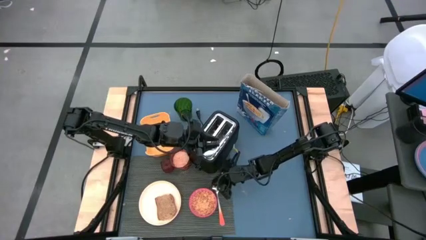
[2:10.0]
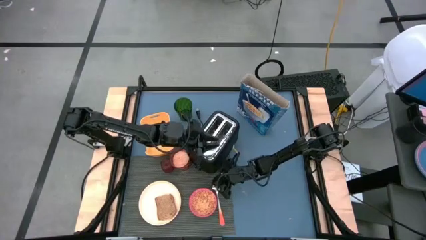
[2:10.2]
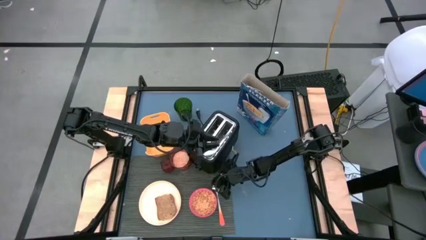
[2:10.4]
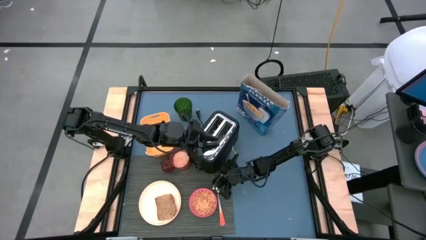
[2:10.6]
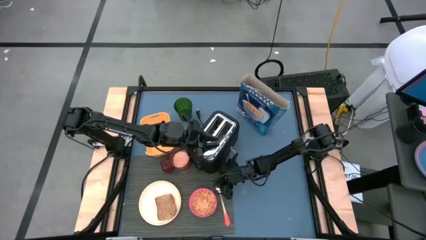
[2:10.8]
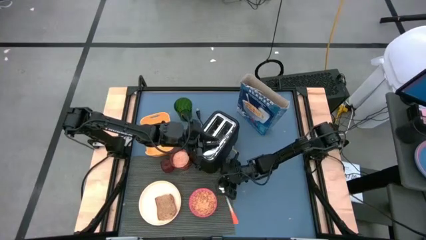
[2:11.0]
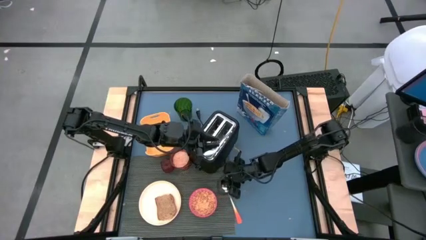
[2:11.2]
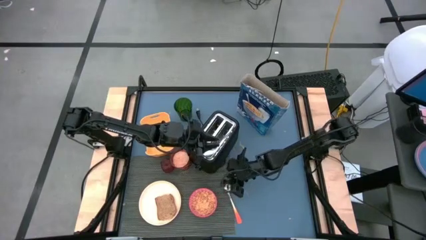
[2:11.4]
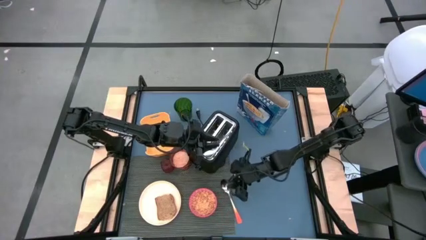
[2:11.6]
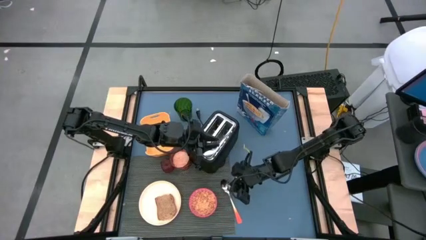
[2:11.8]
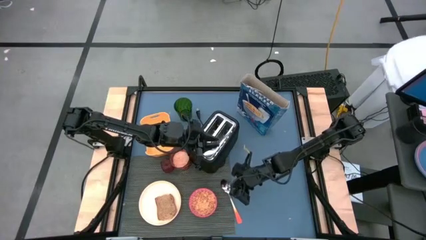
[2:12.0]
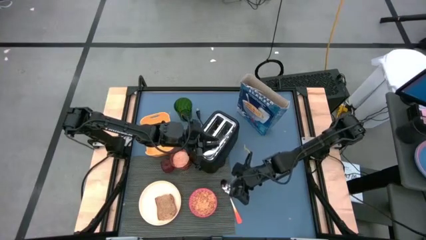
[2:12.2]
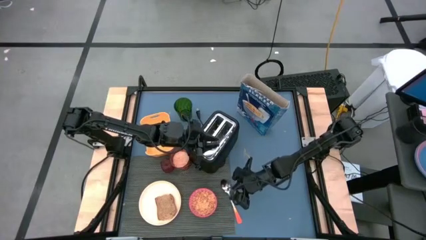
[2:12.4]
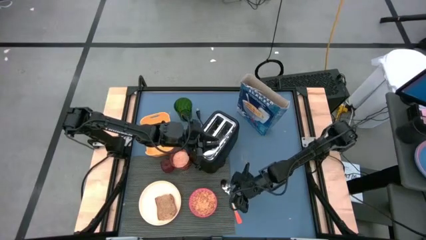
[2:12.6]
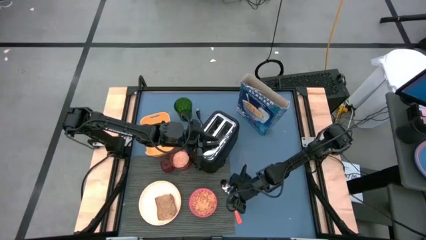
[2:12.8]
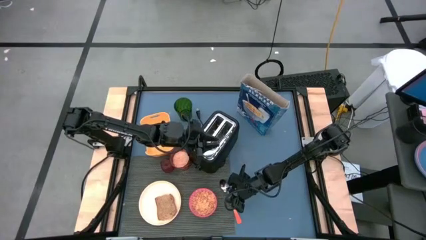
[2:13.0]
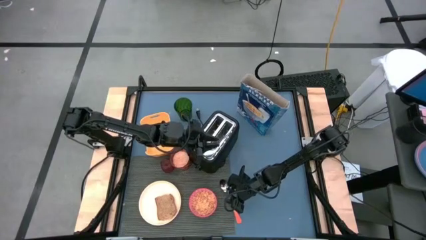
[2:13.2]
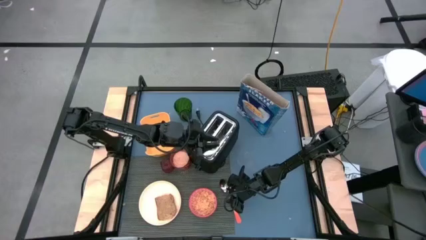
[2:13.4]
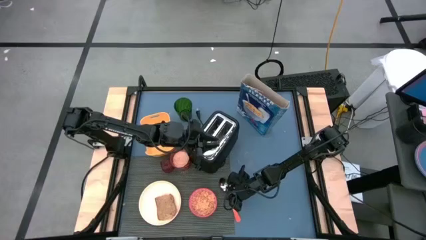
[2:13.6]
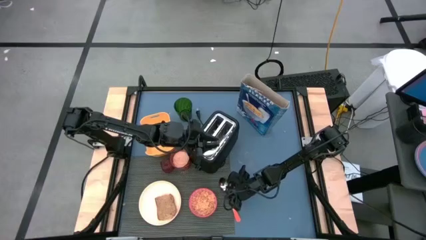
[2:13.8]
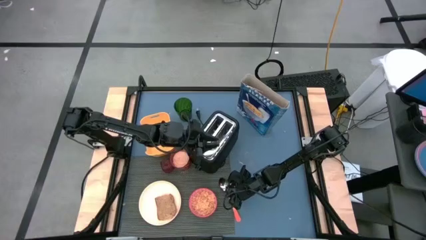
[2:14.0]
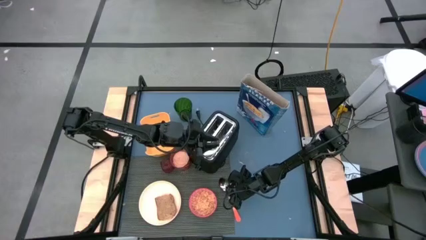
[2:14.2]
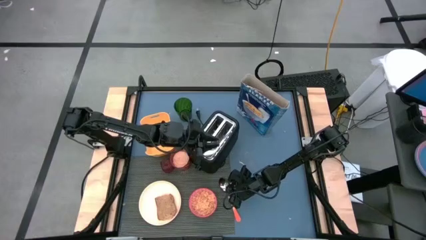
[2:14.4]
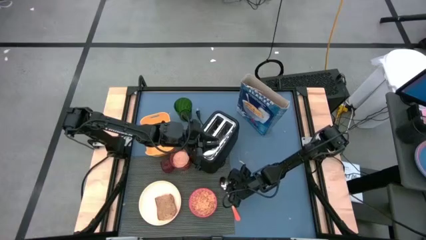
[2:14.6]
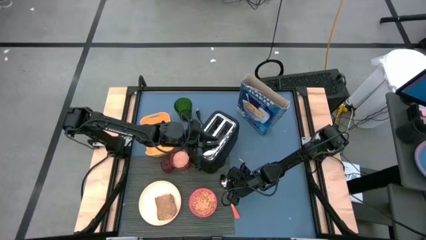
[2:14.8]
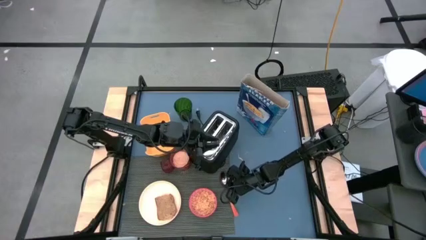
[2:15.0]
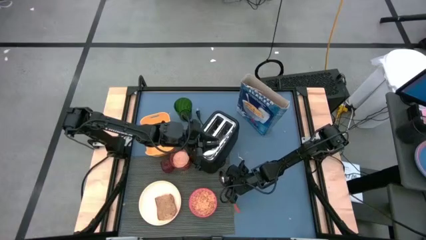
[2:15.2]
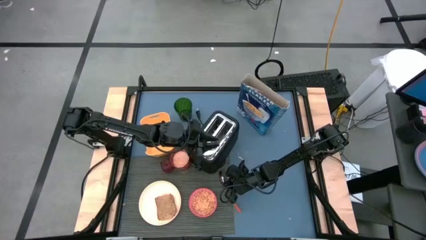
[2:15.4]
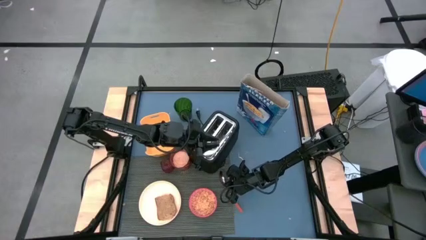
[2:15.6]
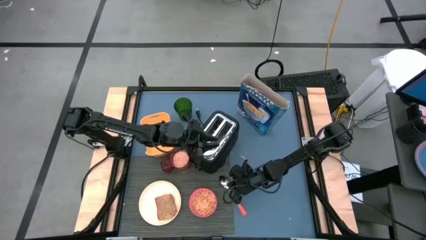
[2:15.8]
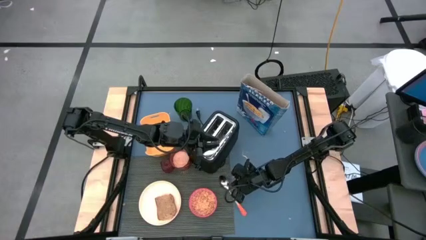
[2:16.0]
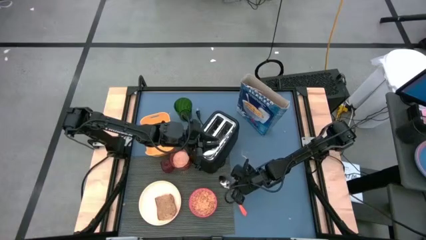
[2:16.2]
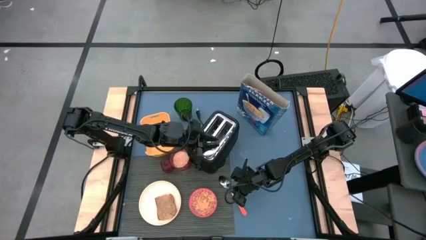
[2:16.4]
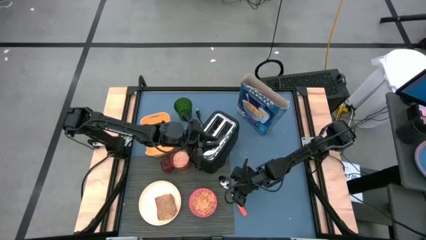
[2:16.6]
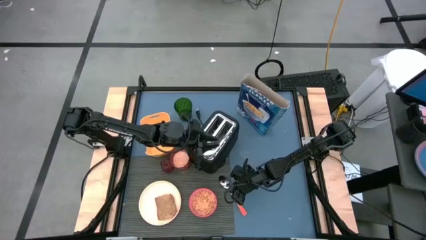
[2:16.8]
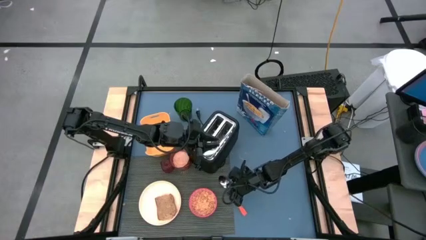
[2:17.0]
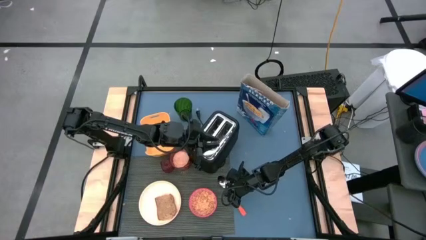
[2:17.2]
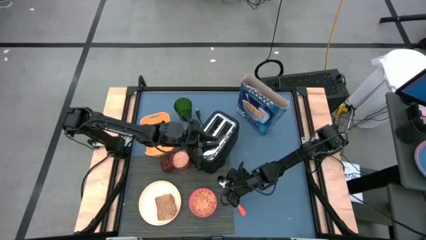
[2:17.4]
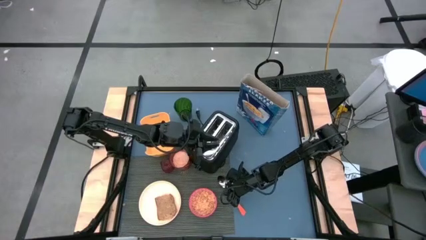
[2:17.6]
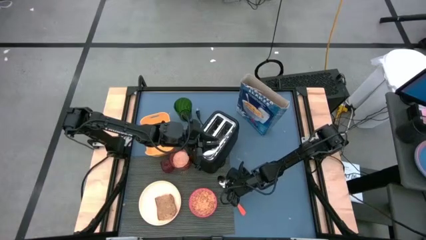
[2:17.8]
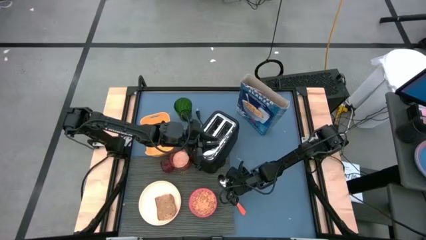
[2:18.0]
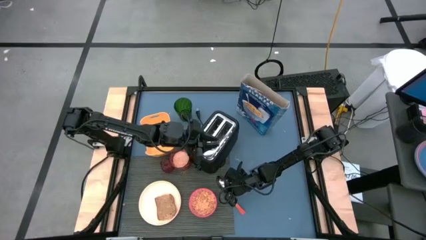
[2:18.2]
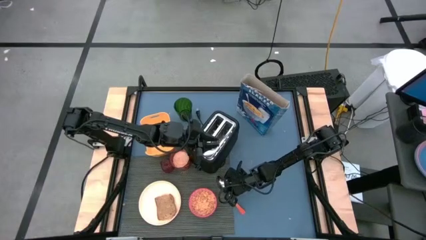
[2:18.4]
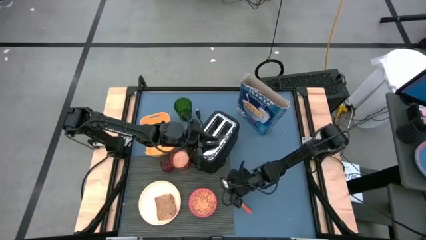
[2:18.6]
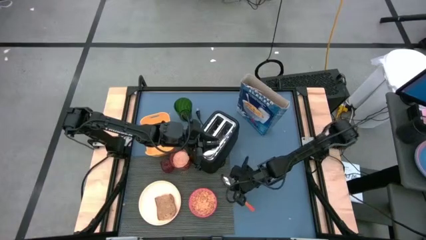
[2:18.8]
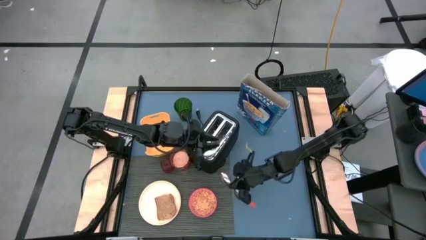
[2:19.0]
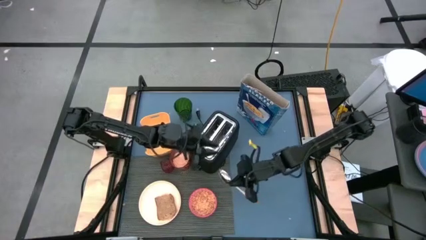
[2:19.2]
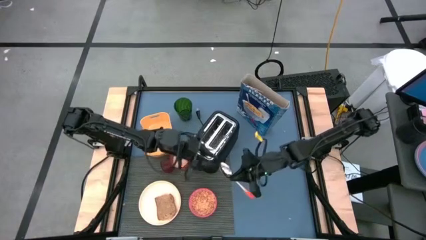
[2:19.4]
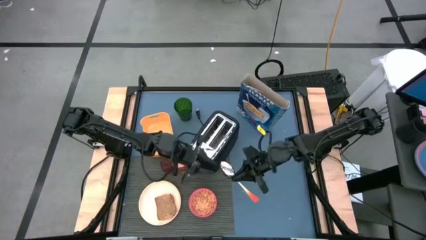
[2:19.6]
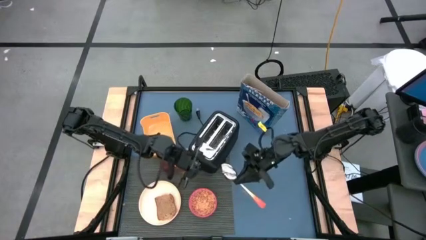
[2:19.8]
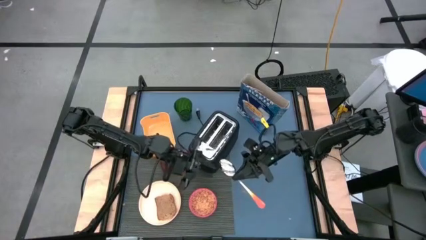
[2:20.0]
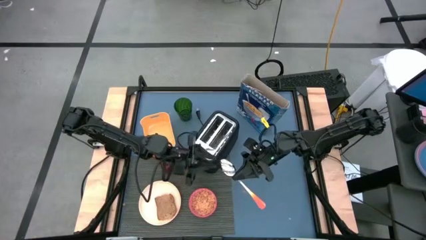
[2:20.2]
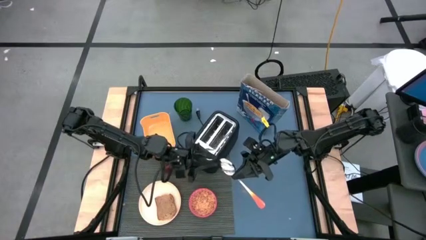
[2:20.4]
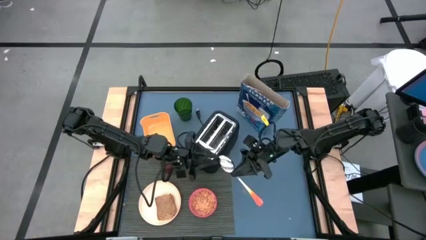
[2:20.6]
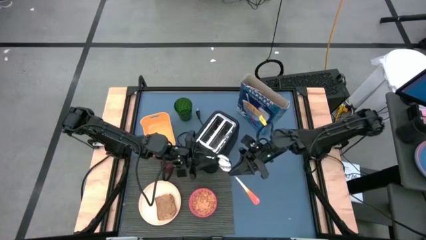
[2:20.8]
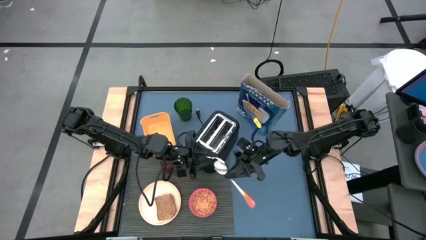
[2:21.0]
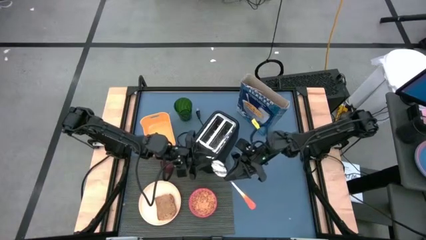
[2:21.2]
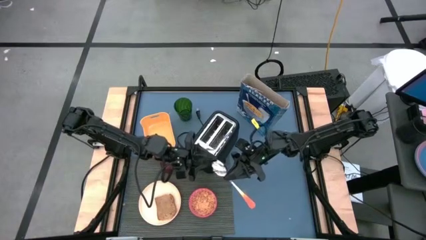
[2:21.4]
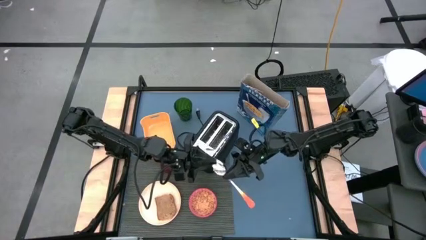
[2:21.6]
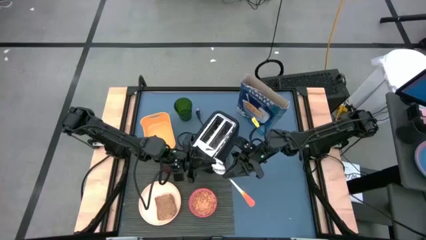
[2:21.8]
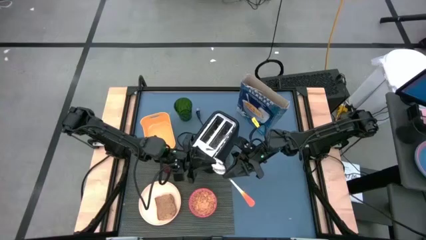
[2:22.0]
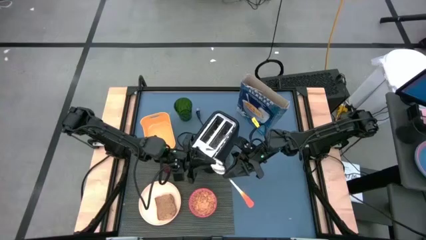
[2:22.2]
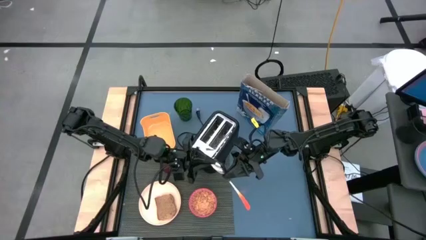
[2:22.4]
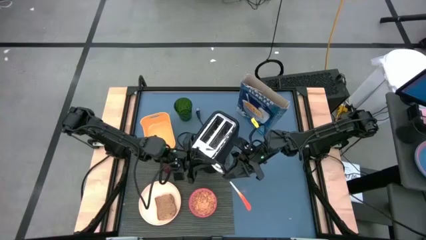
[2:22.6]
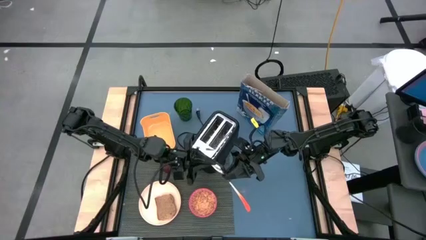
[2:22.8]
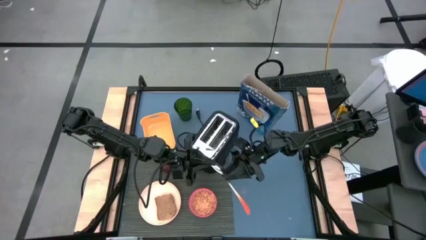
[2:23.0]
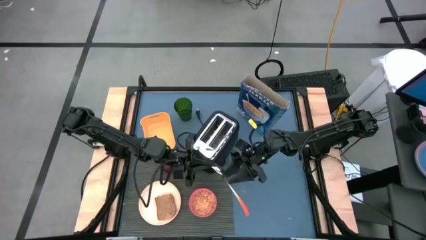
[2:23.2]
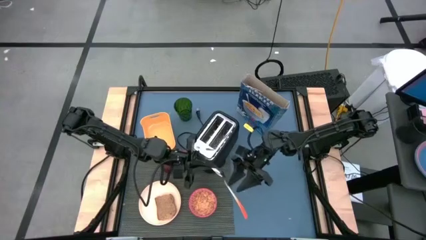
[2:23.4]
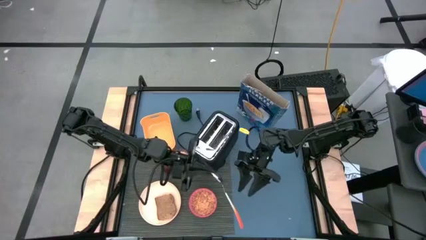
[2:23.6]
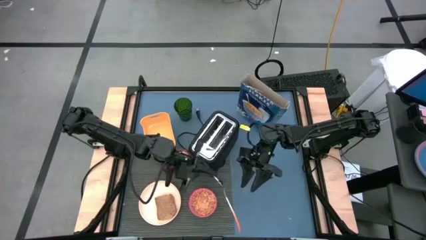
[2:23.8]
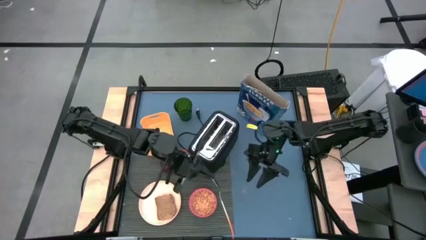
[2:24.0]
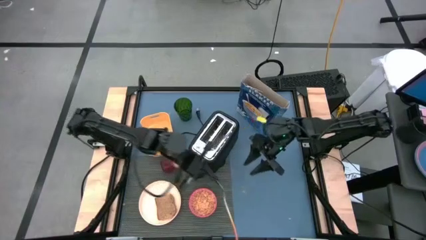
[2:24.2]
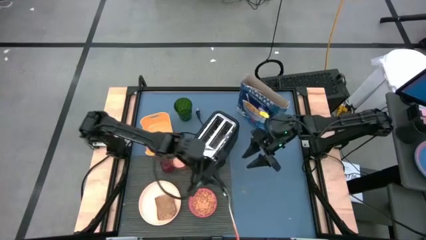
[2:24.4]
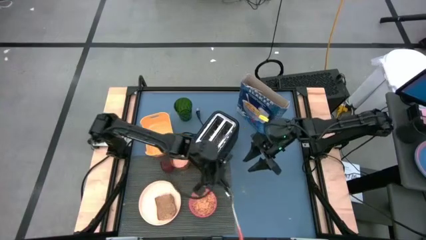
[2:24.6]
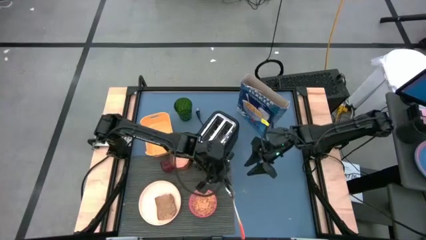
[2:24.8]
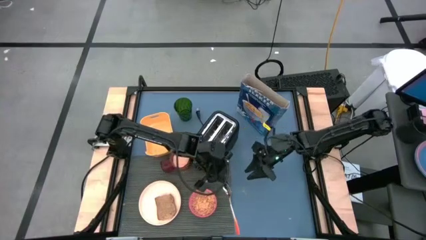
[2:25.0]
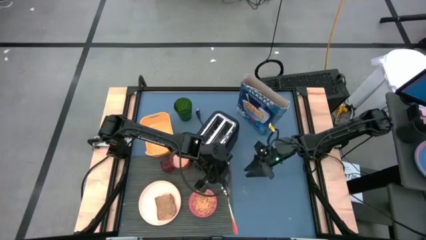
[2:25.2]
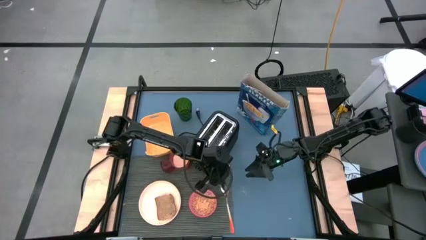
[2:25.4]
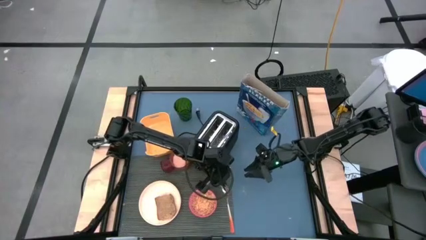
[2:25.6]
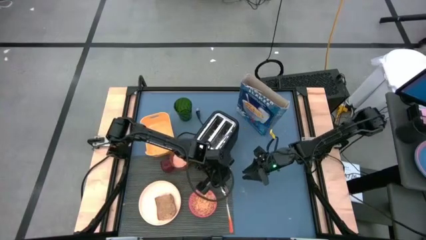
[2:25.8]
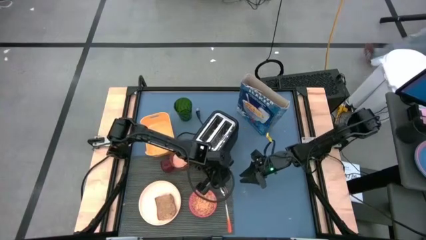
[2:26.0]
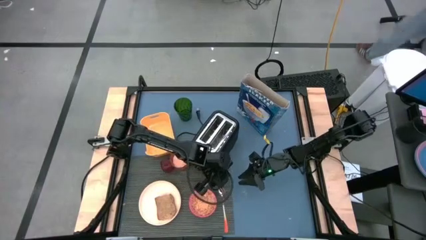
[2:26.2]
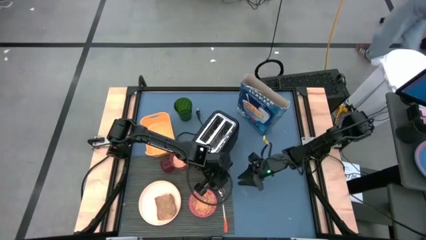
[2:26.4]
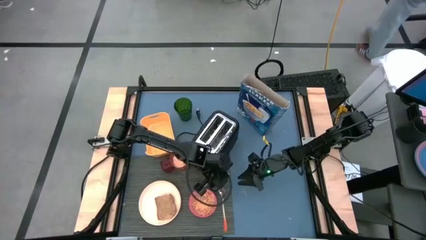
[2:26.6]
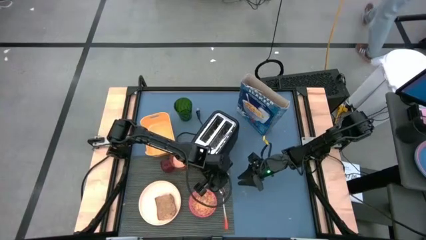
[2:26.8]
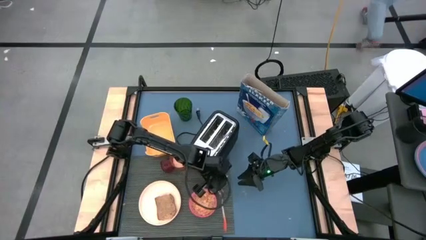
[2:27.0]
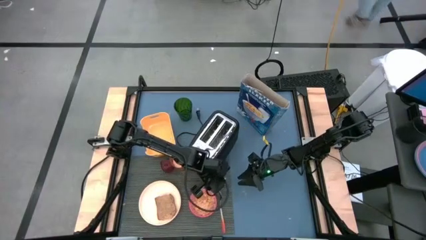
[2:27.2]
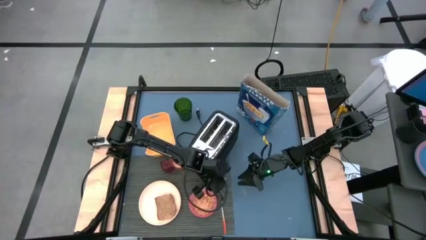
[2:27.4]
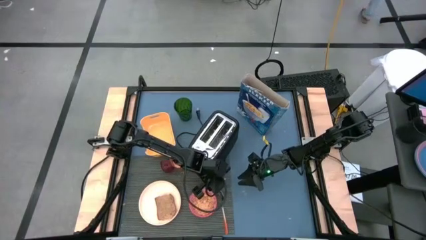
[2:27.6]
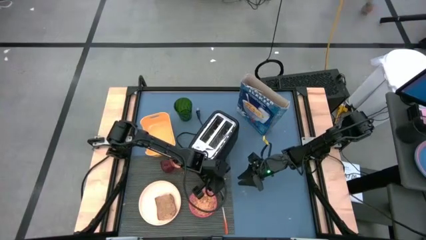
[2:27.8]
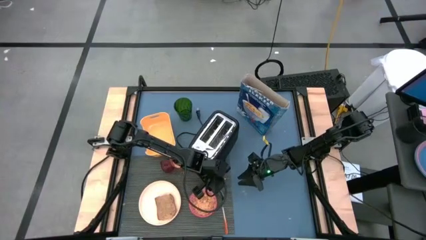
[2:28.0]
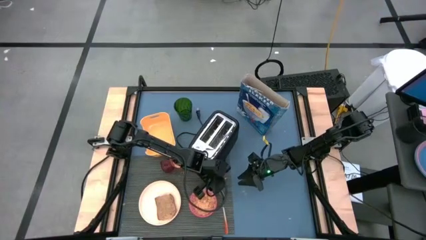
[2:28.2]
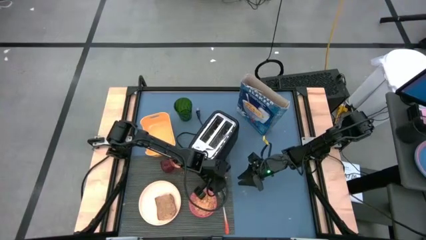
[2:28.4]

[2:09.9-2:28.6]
Task: Arrange a breakfast setting
Put the orange fork to the gray tablemat to the right of the red bowl
